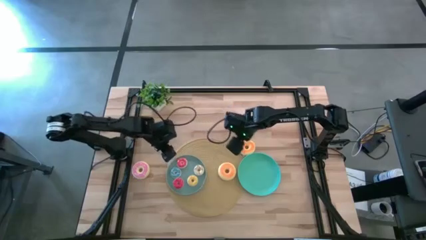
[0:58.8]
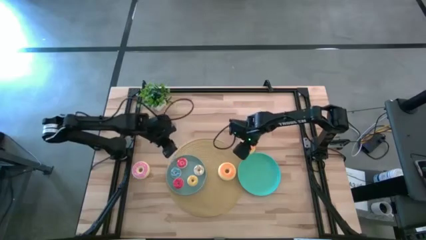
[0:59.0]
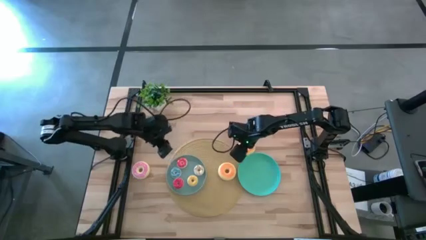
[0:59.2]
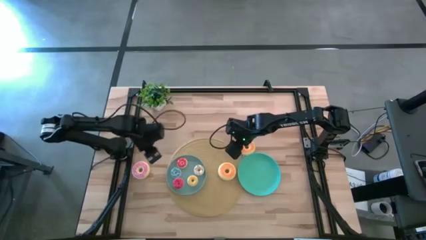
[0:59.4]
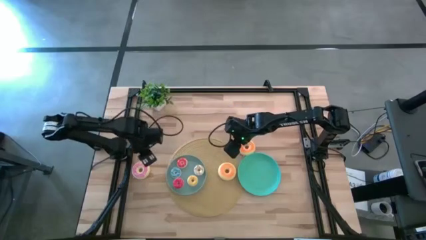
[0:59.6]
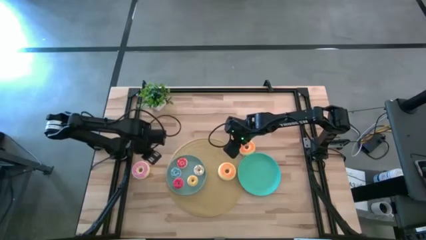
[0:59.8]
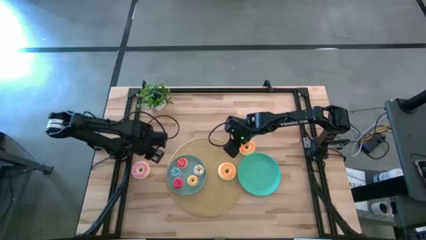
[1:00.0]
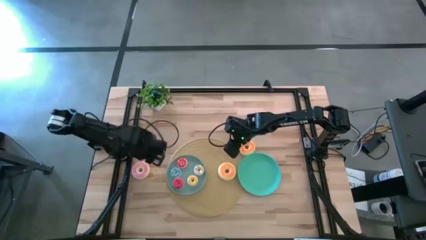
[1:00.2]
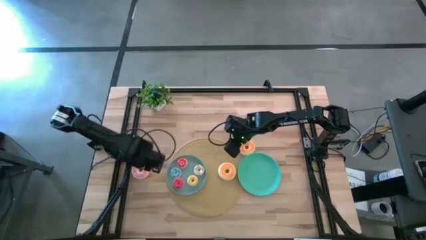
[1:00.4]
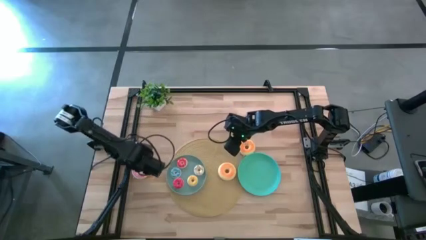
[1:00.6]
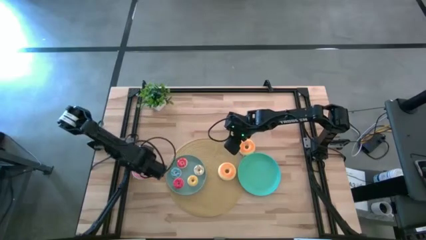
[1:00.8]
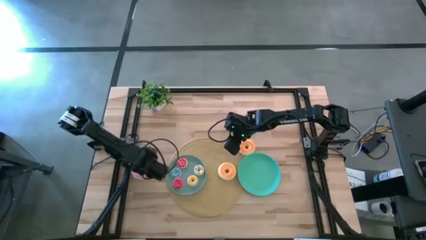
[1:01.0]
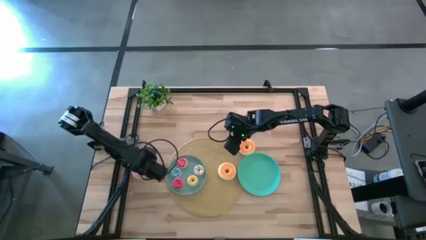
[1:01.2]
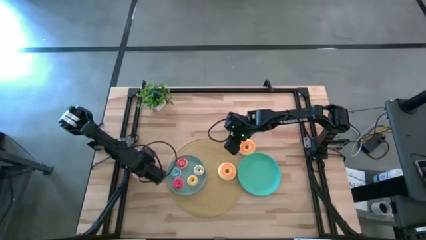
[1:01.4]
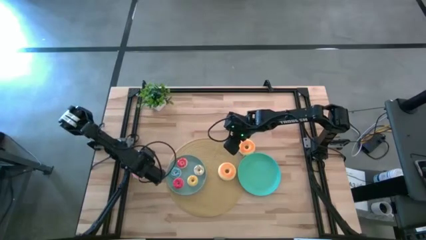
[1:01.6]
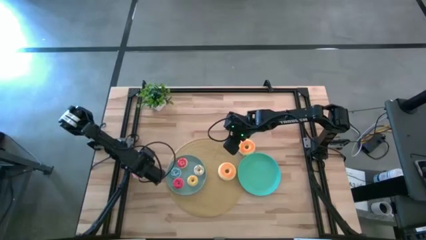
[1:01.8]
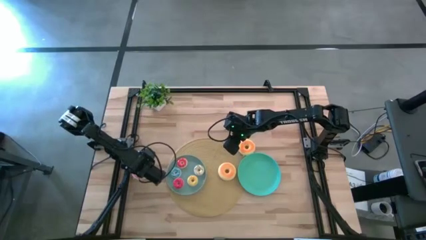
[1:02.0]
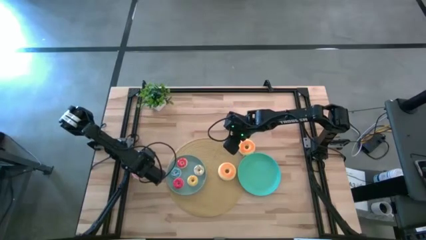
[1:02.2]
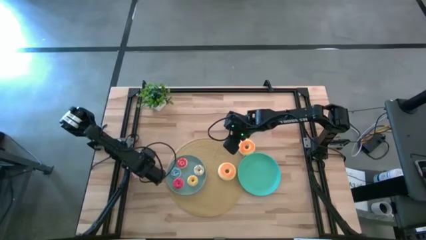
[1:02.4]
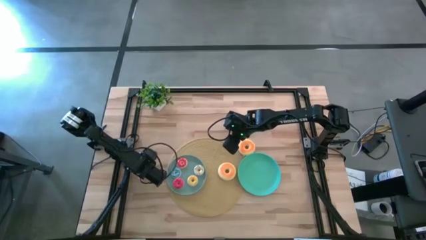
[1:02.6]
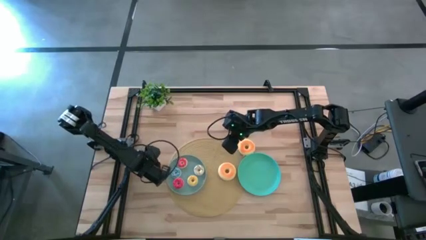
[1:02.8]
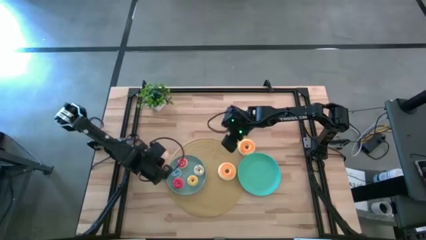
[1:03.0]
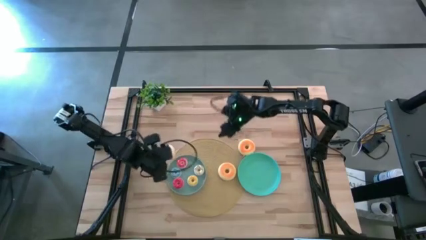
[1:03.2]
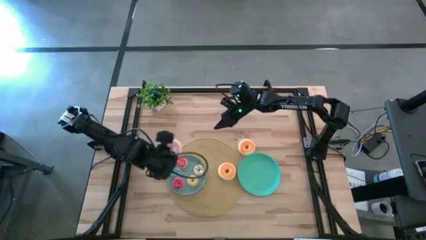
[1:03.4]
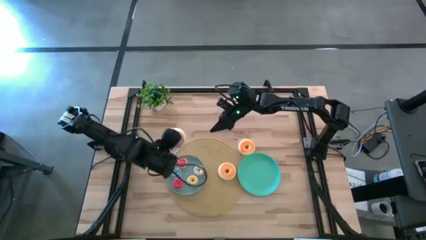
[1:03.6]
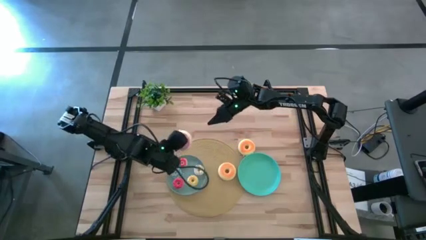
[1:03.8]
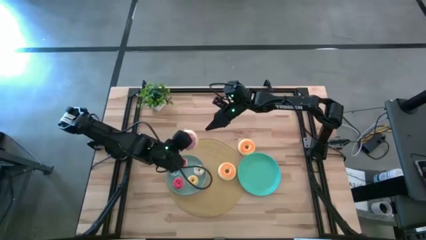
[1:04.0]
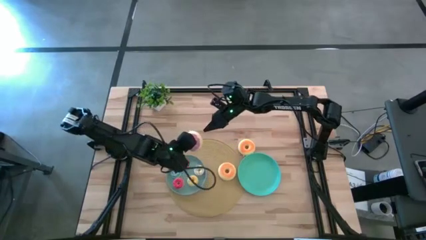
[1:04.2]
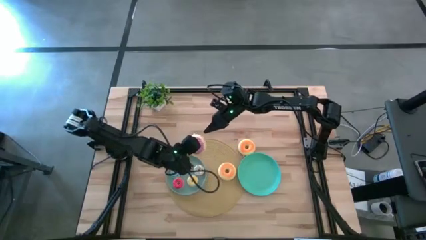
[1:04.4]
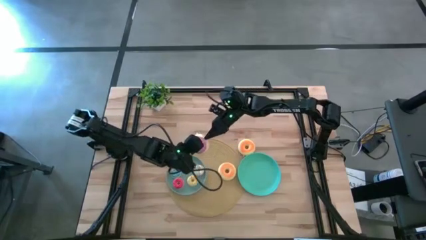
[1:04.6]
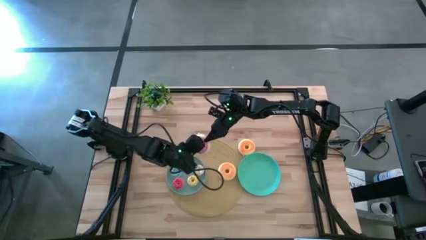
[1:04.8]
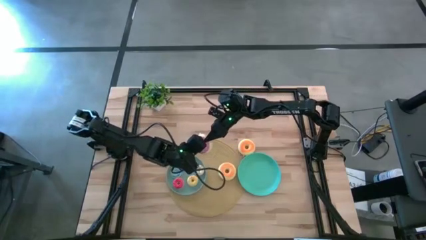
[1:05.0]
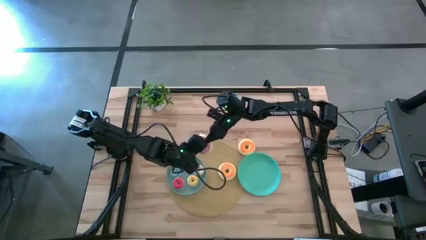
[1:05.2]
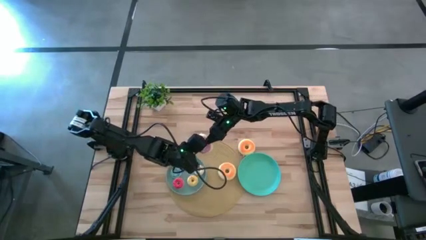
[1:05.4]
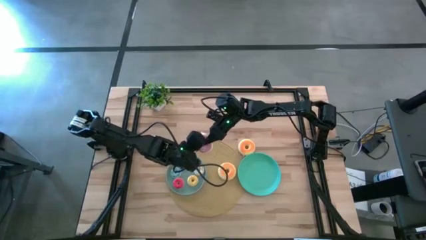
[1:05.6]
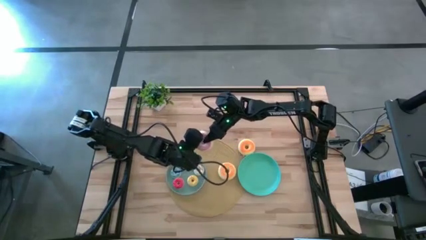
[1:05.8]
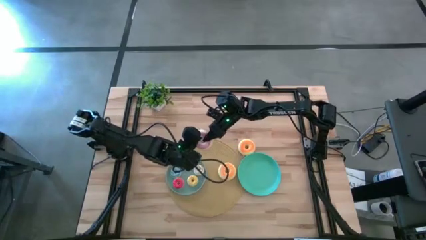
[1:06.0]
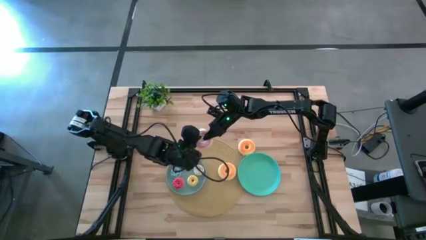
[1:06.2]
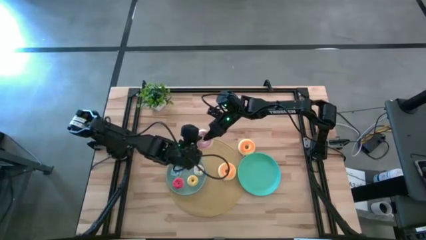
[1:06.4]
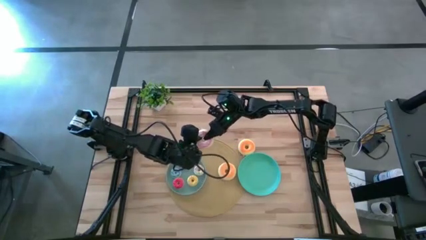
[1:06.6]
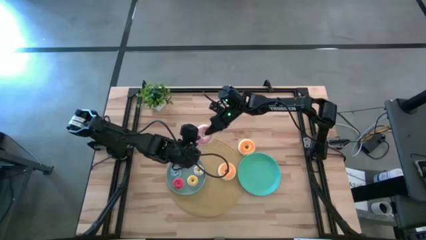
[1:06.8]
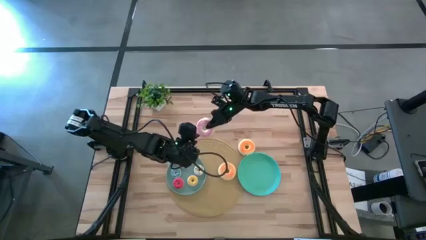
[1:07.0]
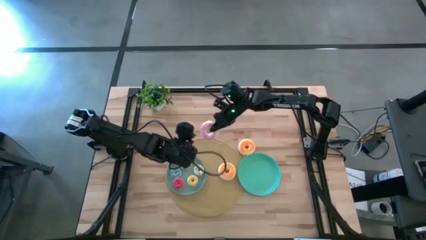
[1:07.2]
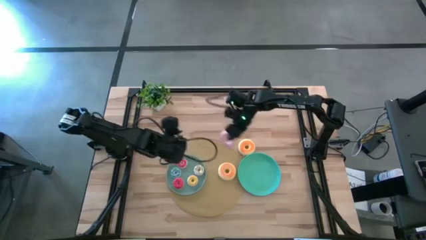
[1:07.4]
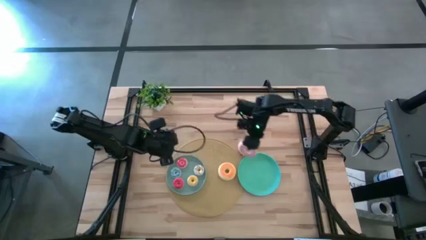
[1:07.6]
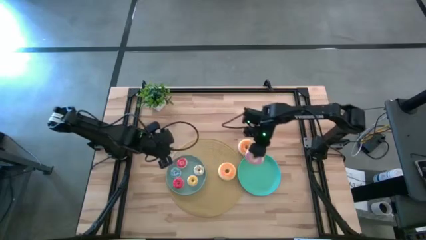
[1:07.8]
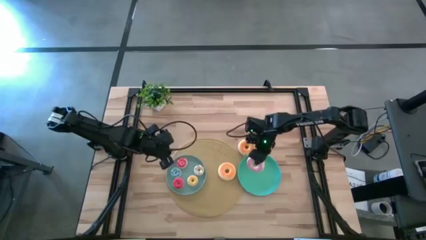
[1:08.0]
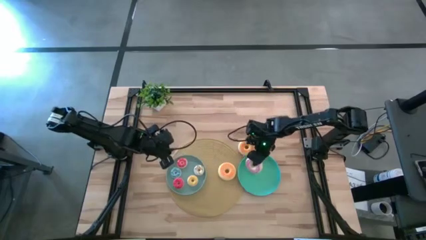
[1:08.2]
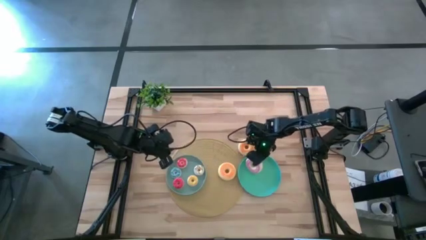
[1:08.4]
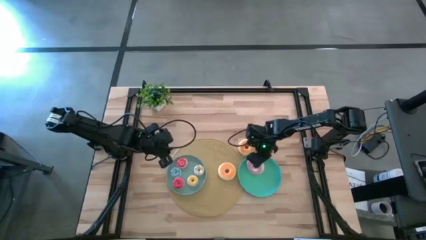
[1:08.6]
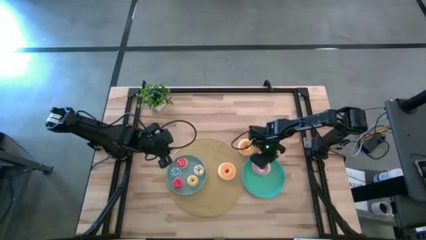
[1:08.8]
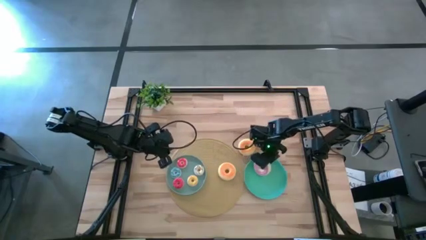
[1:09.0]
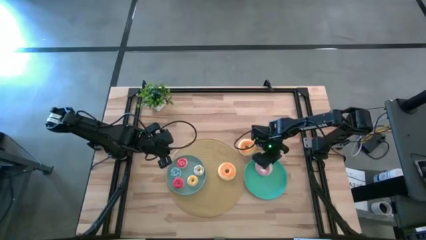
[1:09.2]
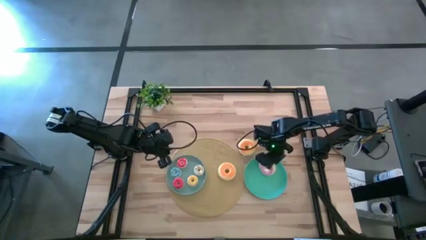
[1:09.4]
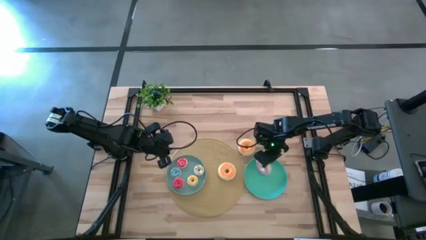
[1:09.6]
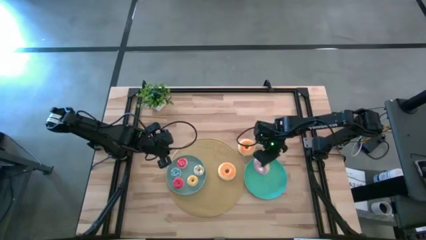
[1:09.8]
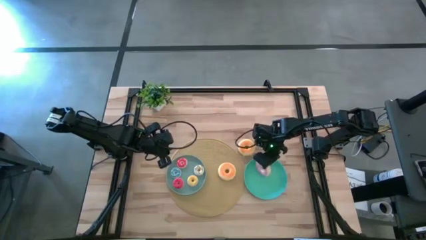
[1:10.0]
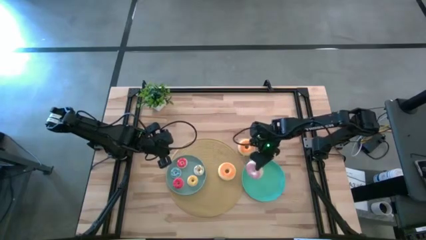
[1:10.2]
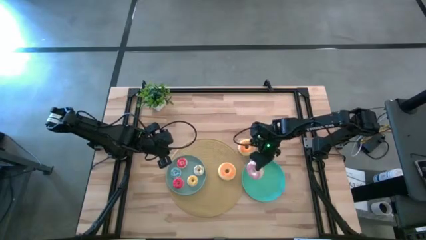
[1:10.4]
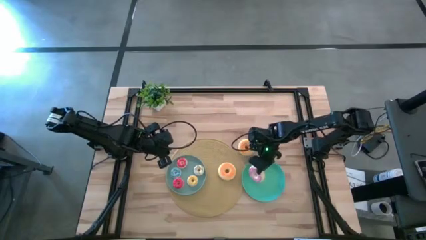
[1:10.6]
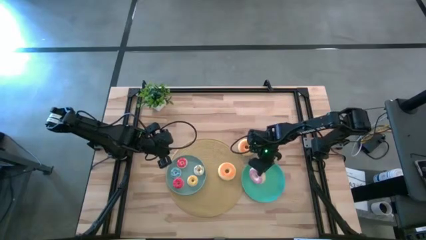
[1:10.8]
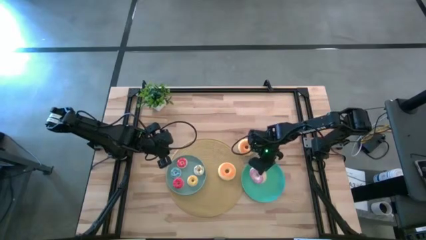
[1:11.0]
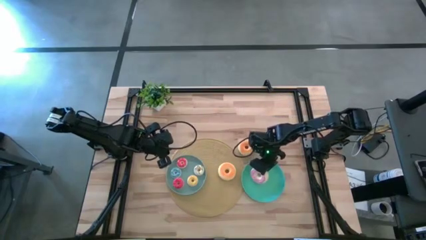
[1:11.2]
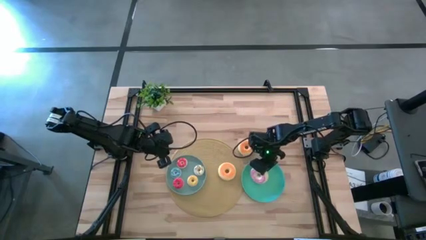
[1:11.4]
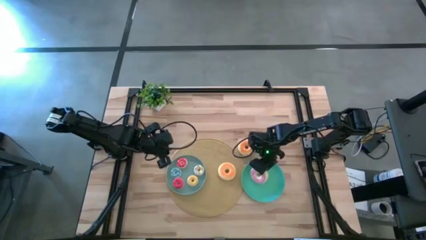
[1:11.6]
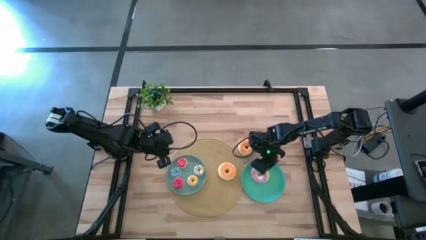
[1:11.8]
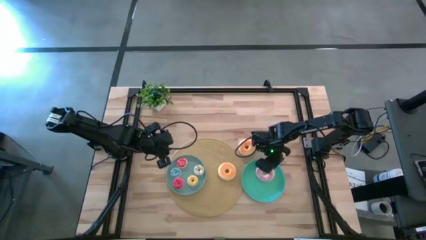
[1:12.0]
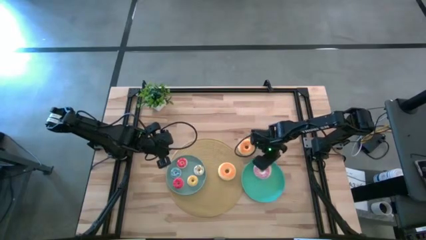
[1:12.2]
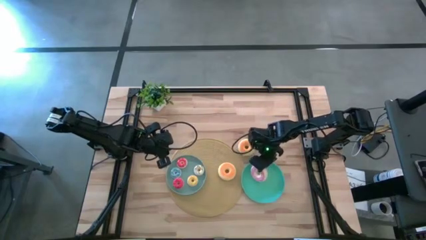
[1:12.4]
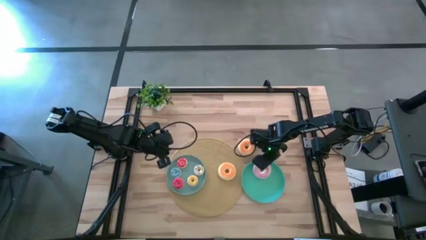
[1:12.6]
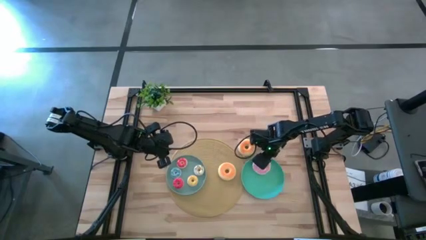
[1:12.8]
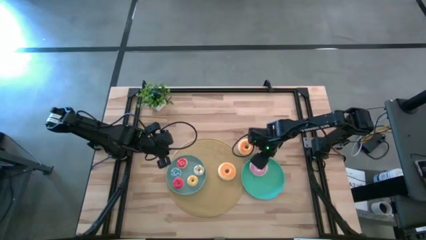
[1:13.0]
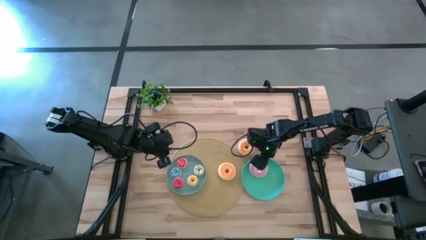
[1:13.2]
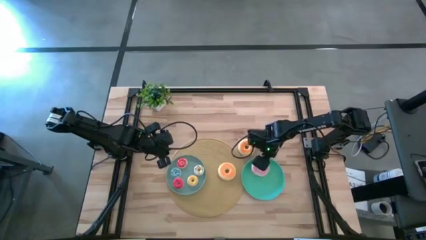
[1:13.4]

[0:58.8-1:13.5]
Task: Pick & Place donuts
Put the large pink donut on the green plate
